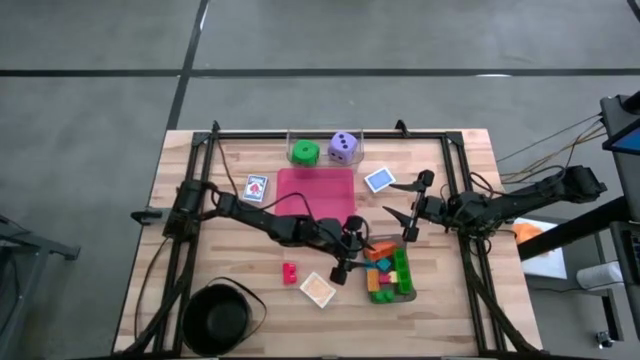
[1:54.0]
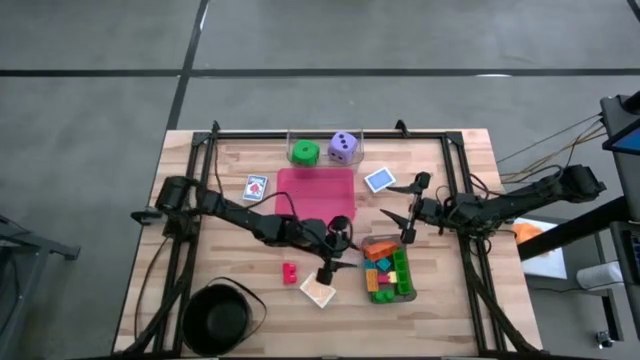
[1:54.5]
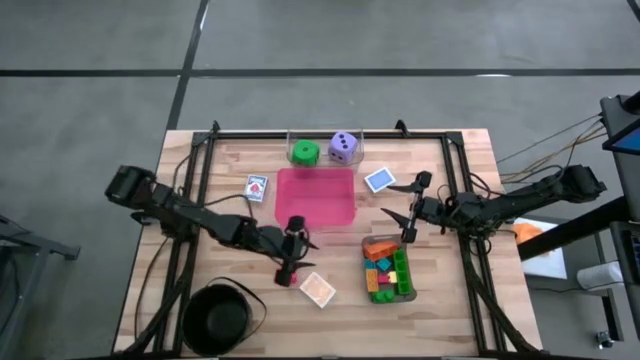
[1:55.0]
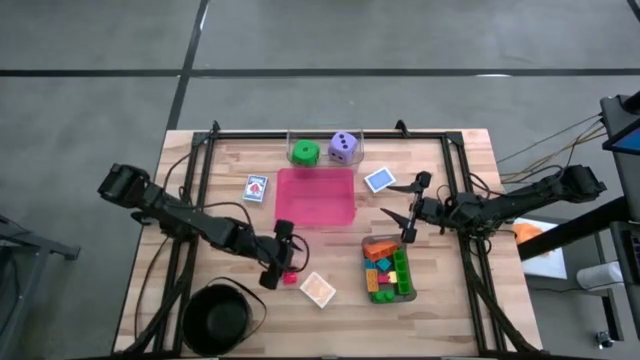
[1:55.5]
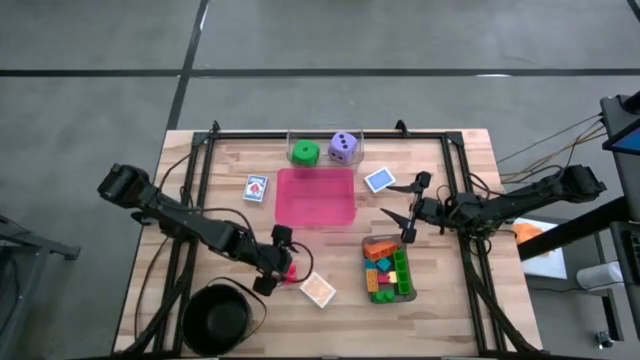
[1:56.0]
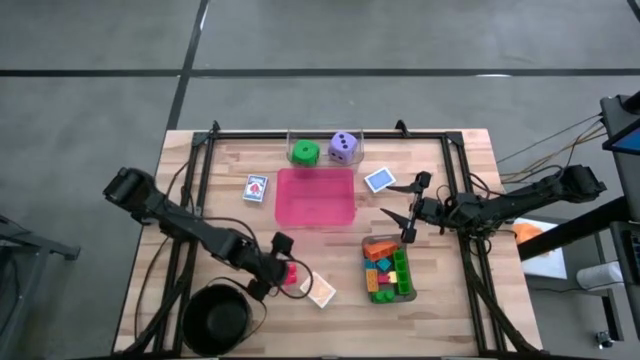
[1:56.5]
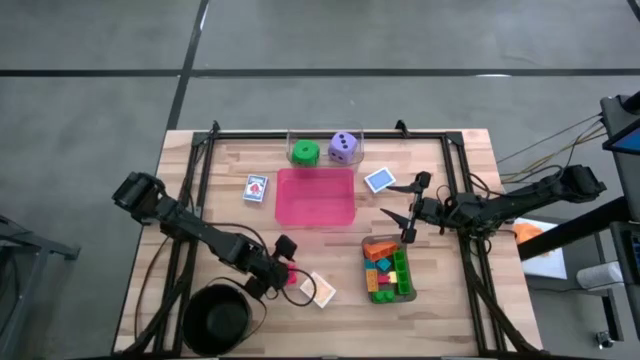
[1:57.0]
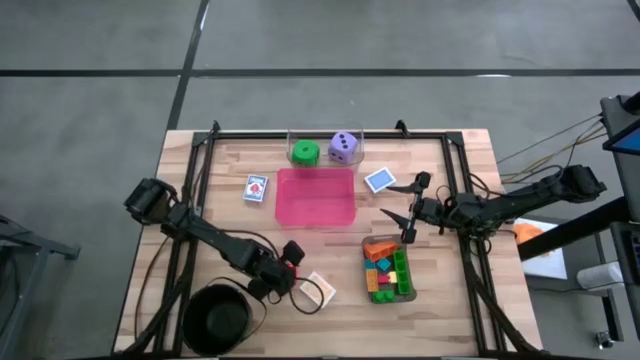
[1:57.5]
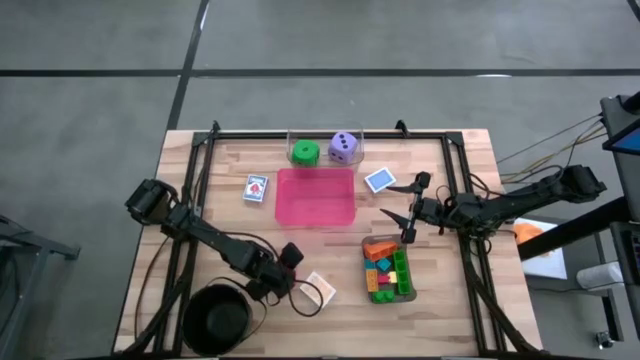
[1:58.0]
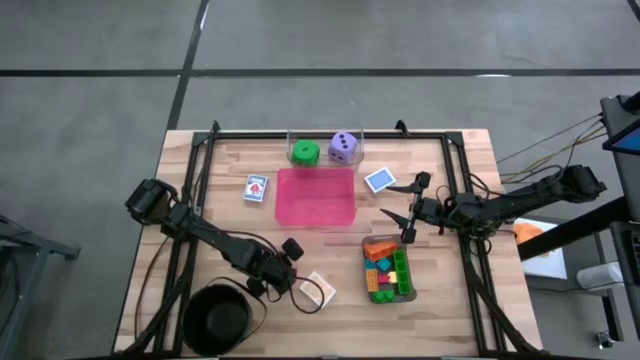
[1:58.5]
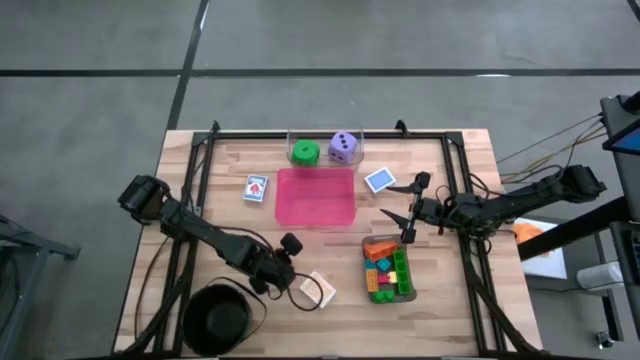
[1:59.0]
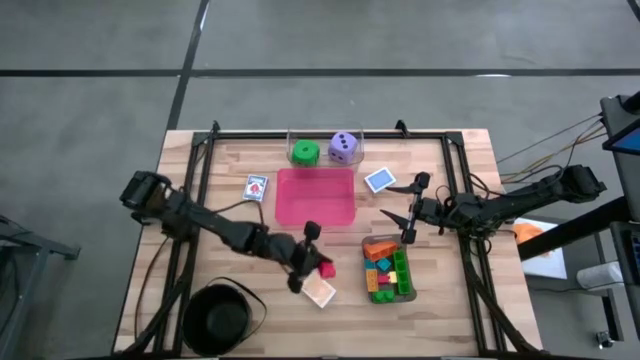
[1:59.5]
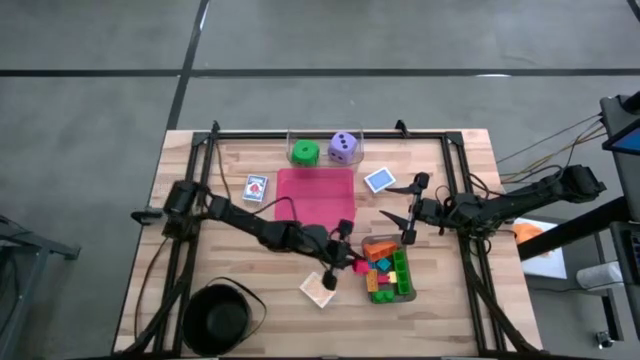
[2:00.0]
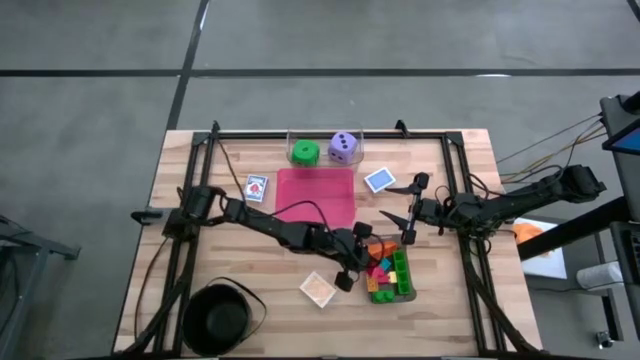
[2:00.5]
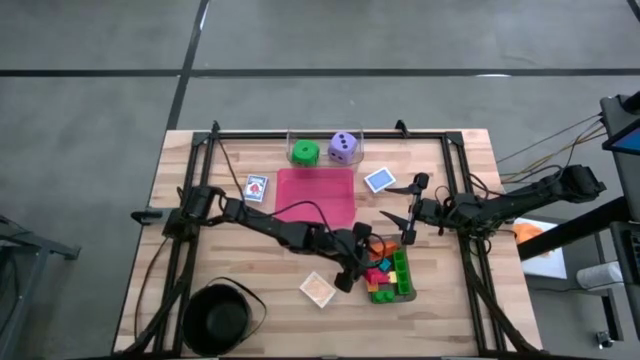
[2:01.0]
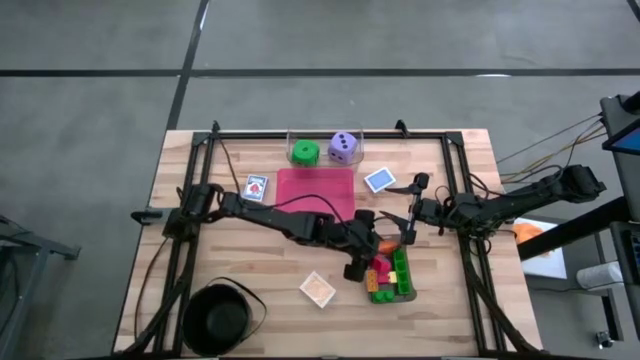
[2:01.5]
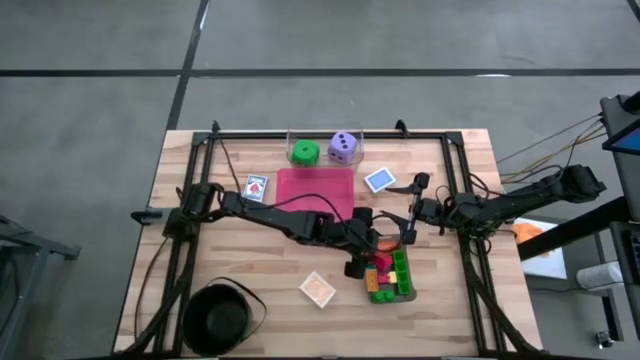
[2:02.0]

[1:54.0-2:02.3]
Task: Pick & Place Toys
Put the big red game piece into the black bin

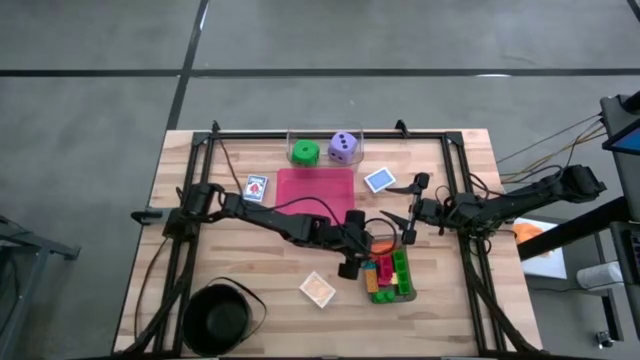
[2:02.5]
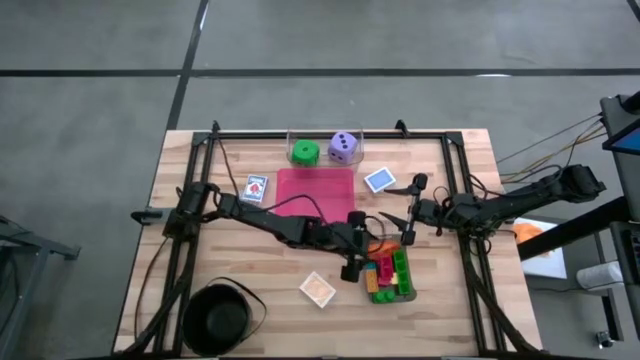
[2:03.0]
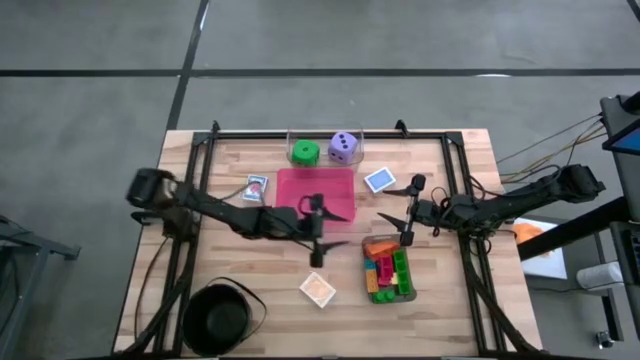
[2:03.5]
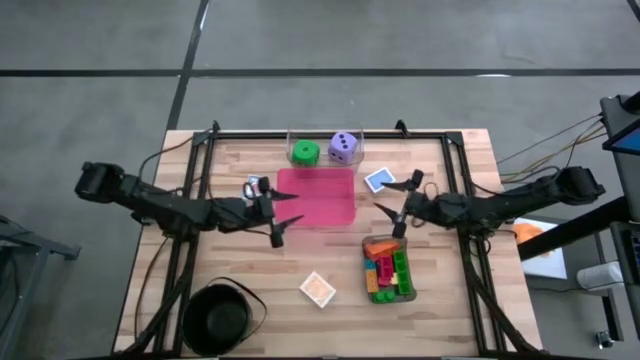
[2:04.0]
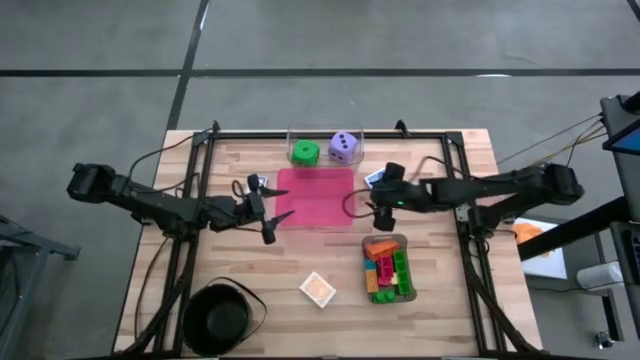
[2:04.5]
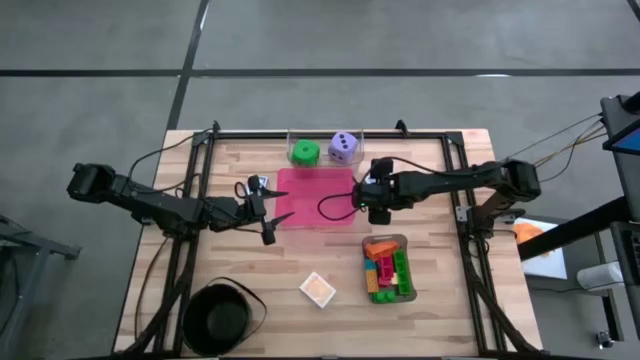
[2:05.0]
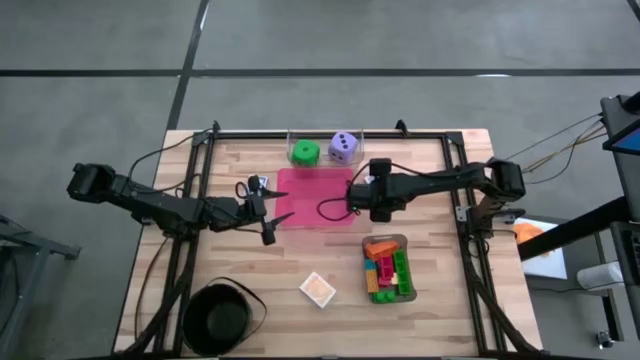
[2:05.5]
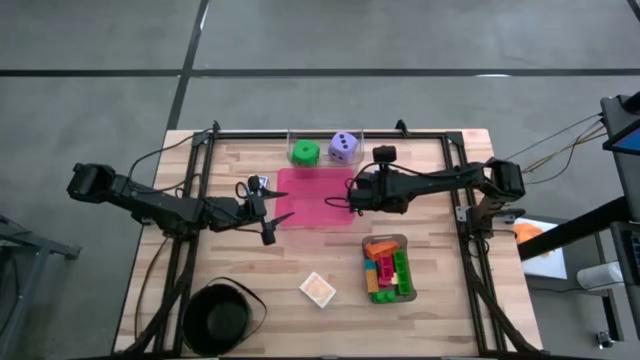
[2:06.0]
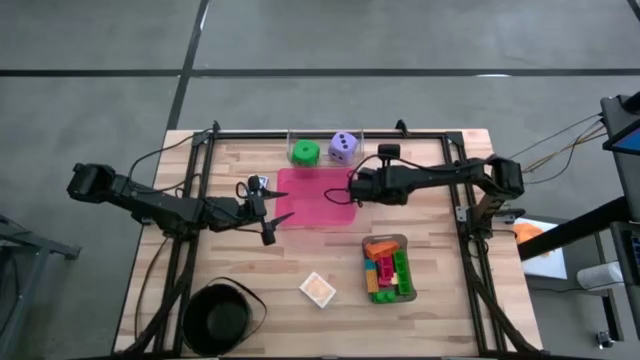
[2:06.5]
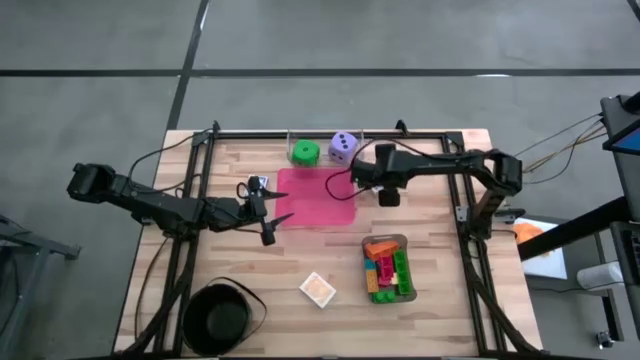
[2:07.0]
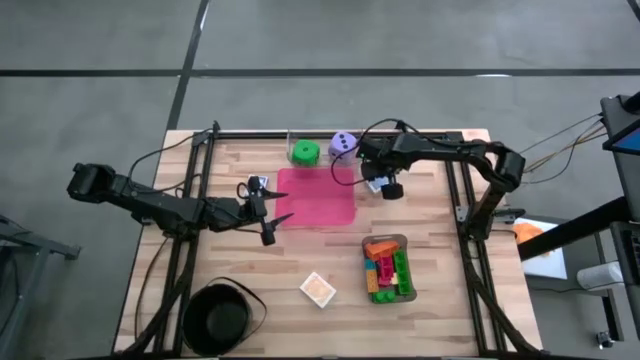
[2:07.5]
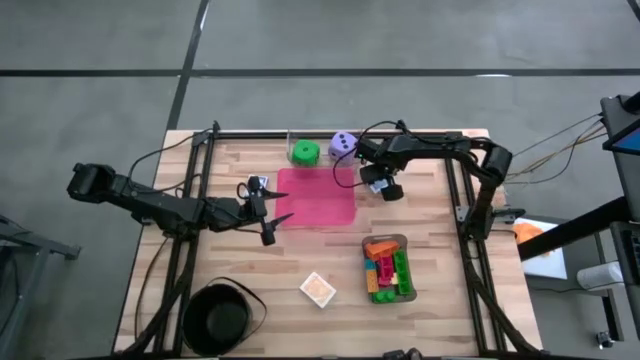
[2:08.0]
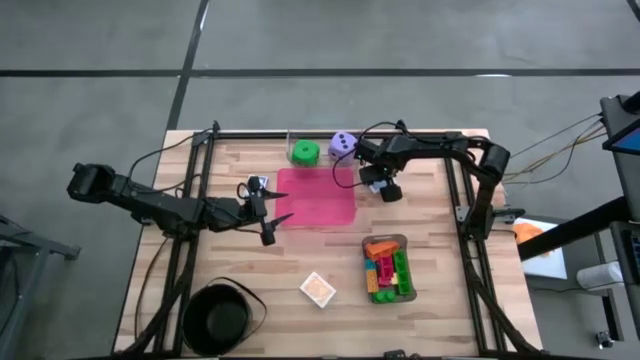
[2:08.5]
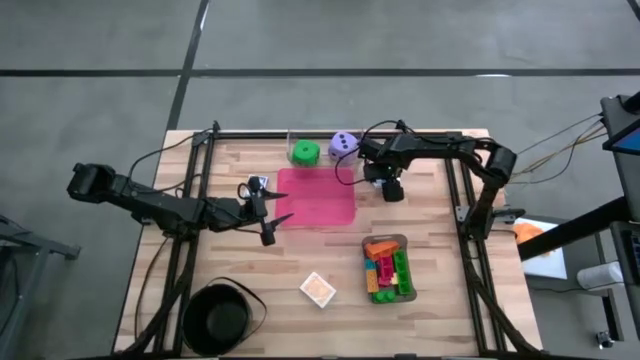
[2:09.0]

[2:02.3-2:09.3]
Put the right blue game card into the red bin

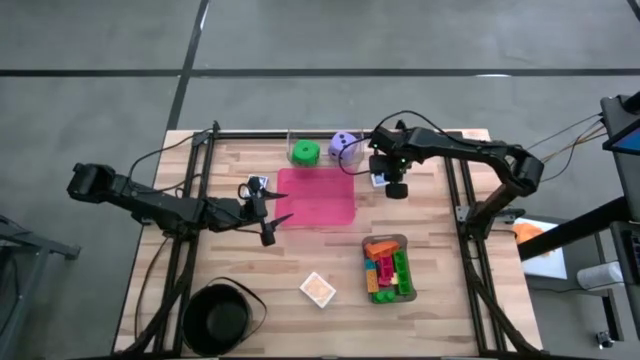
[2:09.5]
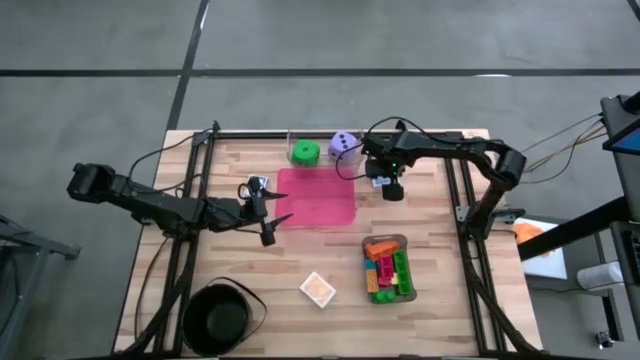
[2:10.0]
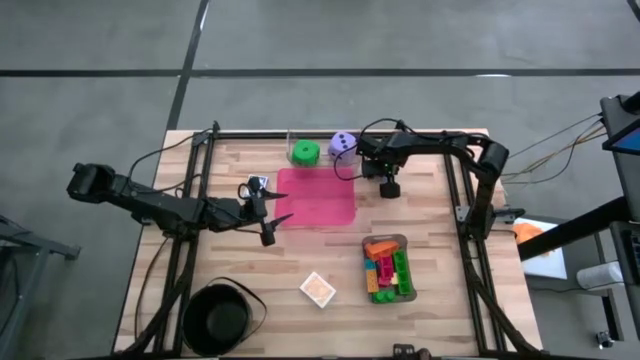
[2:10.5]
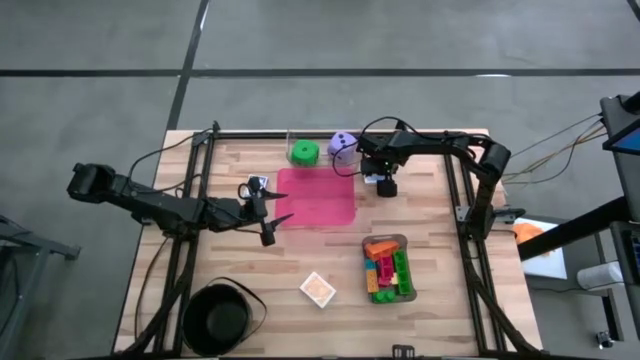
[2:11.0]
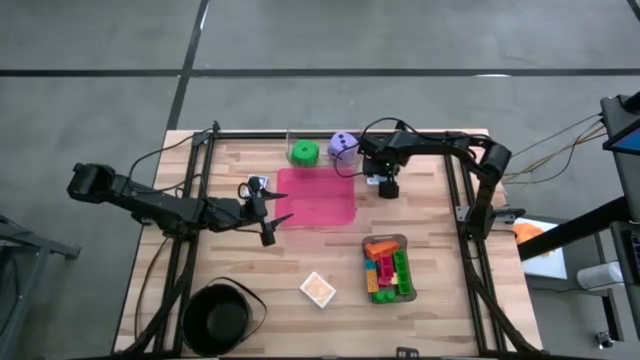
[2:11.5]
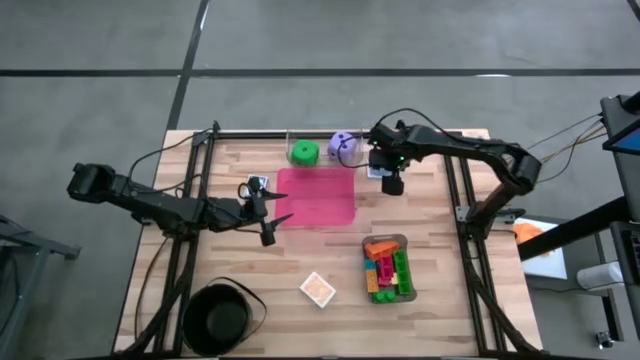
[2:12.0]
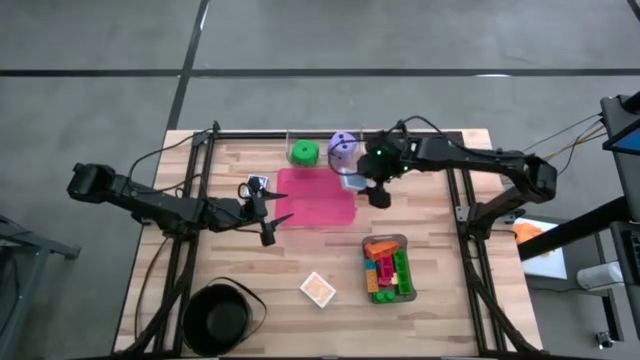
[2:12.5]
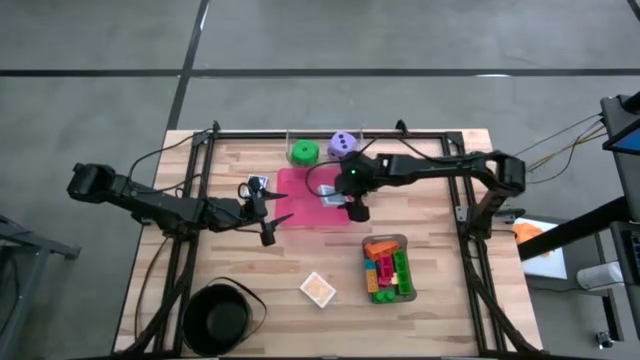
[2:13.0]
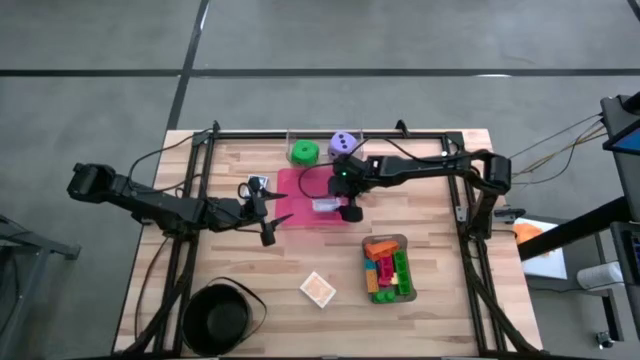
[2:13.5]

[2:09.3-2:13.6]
Put the right blue game card into the red bin
